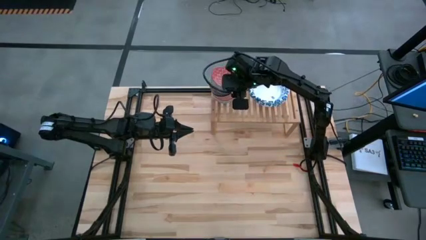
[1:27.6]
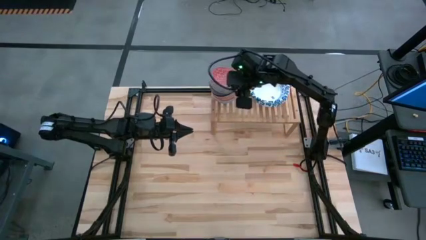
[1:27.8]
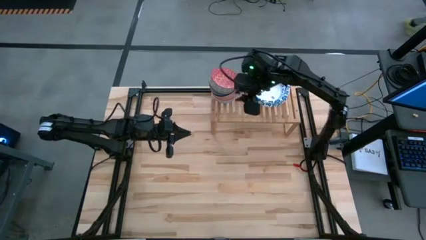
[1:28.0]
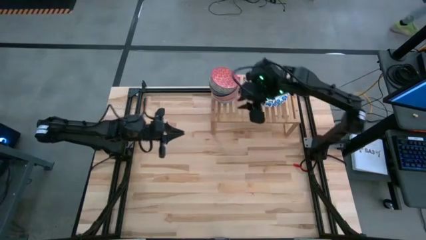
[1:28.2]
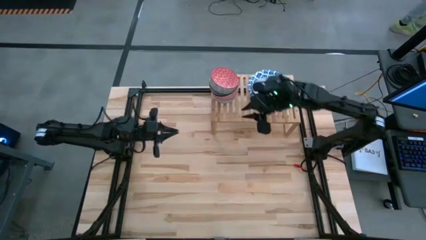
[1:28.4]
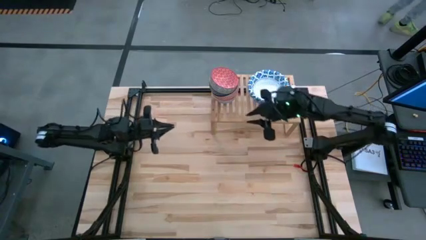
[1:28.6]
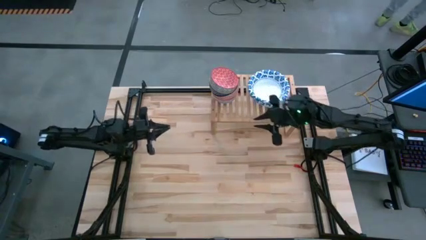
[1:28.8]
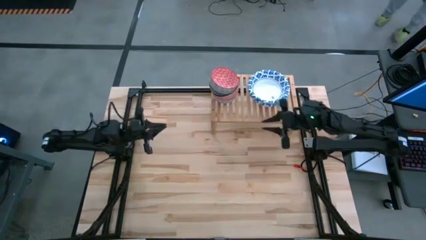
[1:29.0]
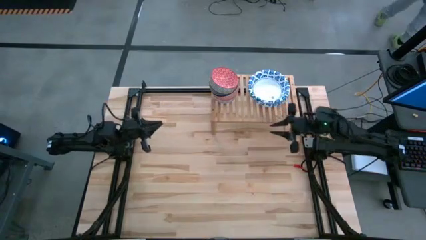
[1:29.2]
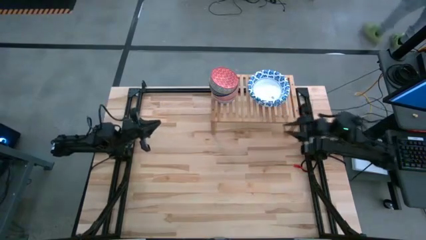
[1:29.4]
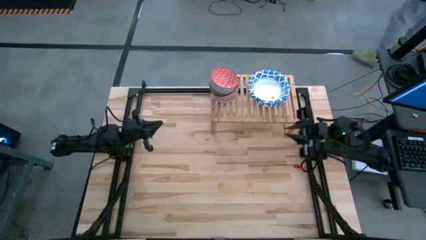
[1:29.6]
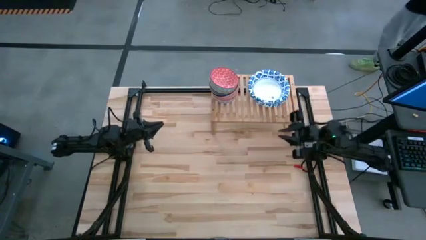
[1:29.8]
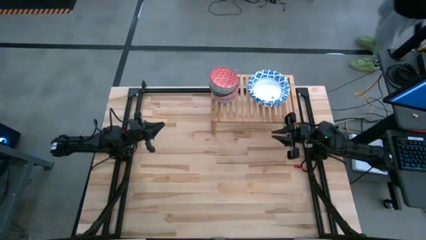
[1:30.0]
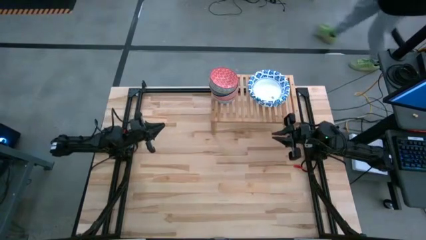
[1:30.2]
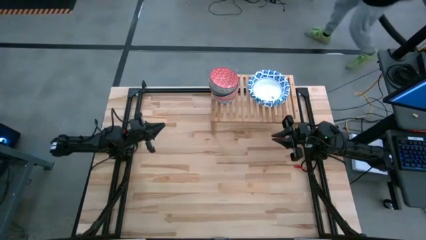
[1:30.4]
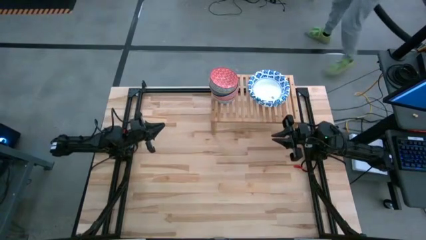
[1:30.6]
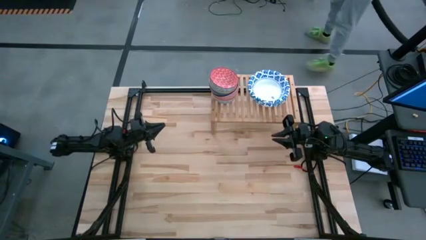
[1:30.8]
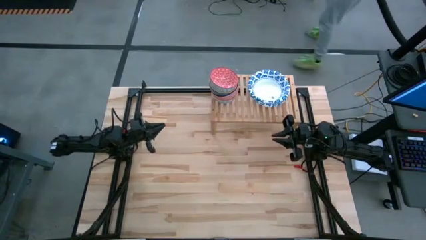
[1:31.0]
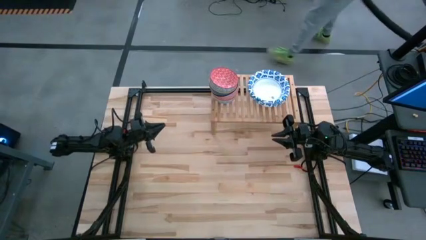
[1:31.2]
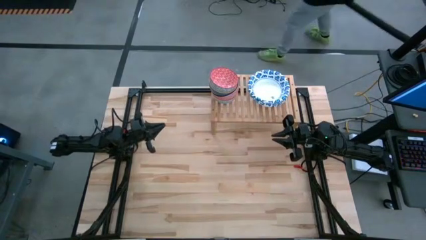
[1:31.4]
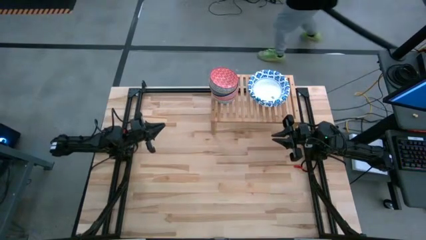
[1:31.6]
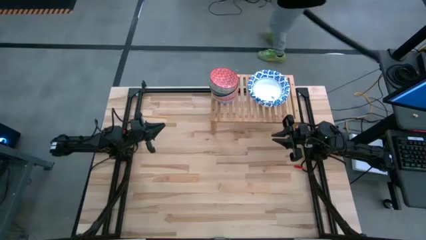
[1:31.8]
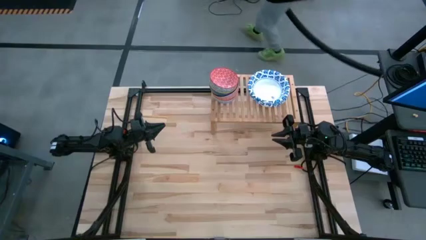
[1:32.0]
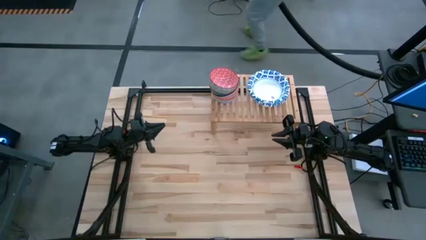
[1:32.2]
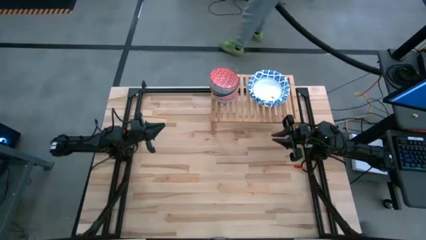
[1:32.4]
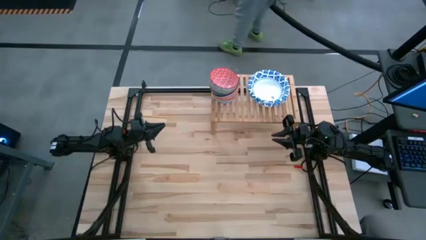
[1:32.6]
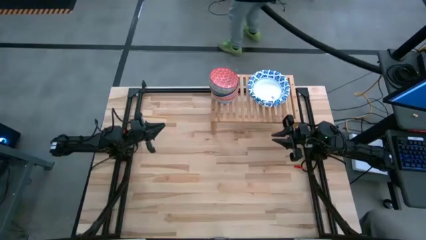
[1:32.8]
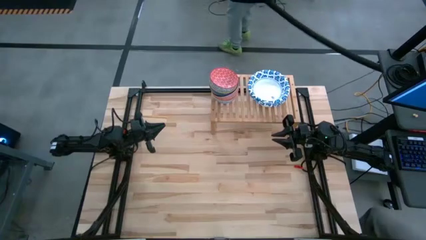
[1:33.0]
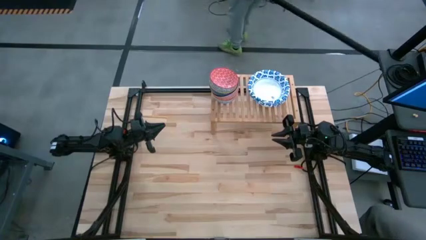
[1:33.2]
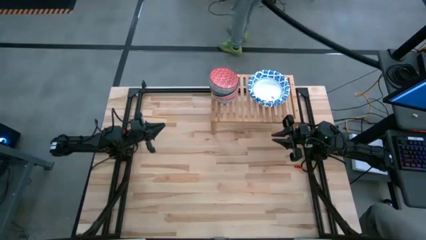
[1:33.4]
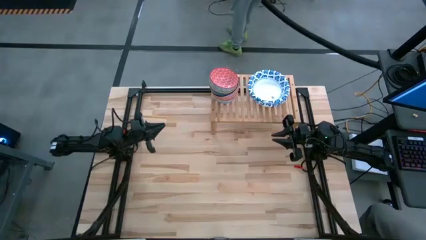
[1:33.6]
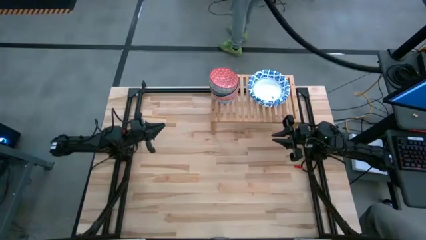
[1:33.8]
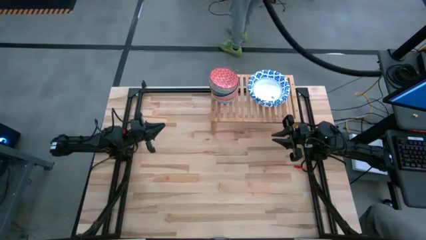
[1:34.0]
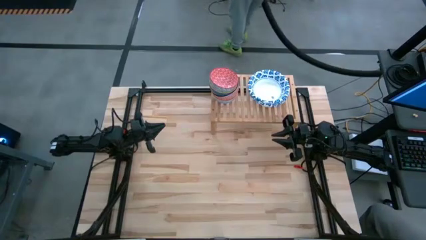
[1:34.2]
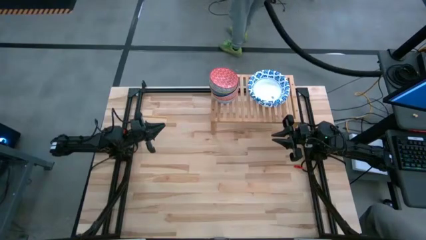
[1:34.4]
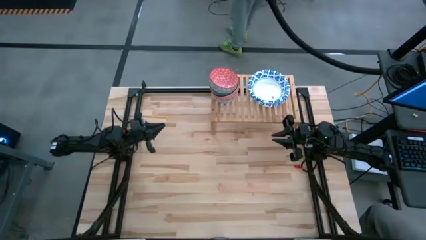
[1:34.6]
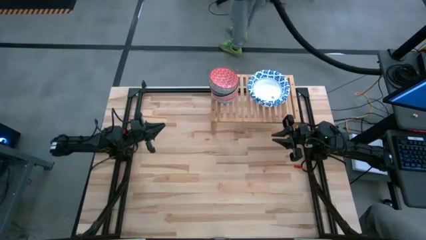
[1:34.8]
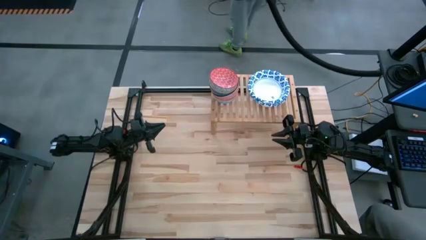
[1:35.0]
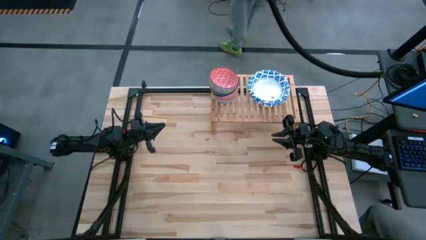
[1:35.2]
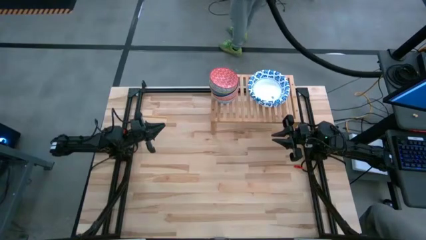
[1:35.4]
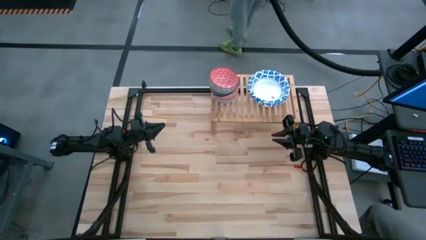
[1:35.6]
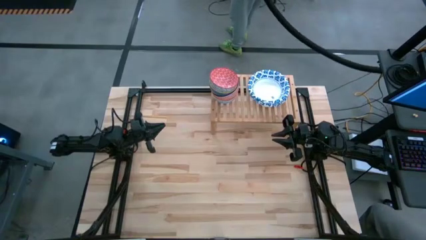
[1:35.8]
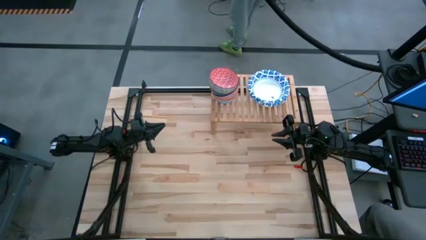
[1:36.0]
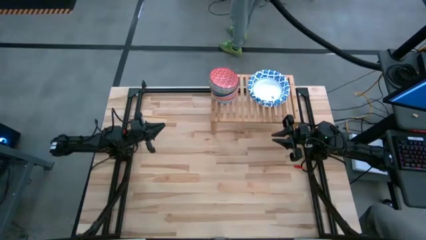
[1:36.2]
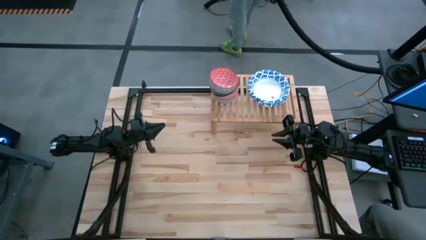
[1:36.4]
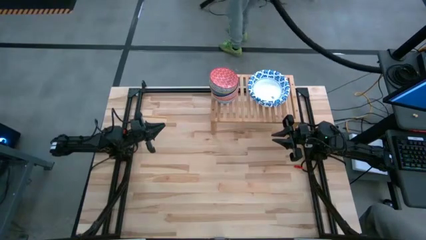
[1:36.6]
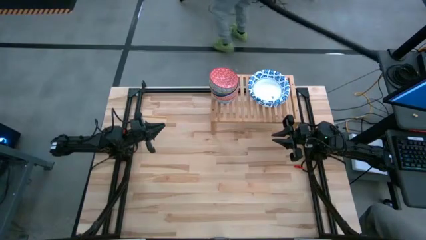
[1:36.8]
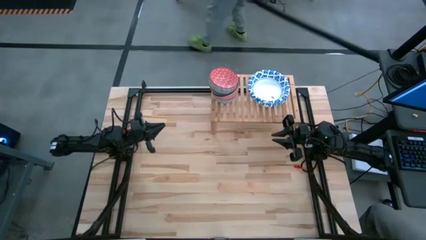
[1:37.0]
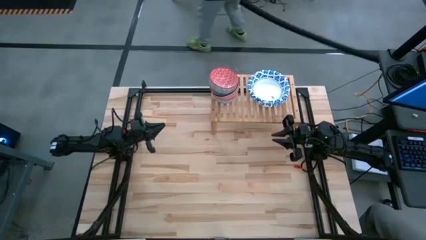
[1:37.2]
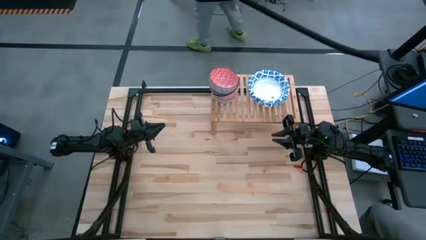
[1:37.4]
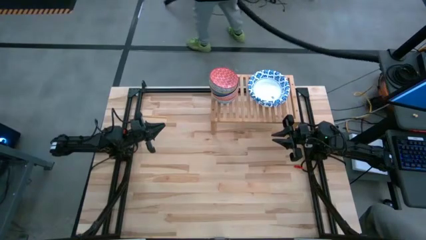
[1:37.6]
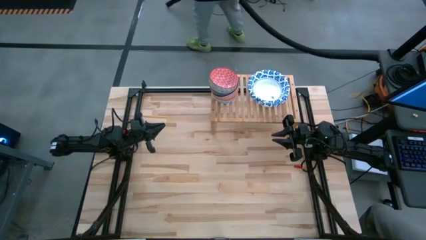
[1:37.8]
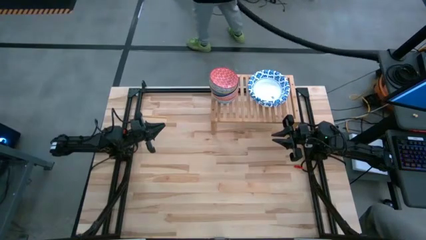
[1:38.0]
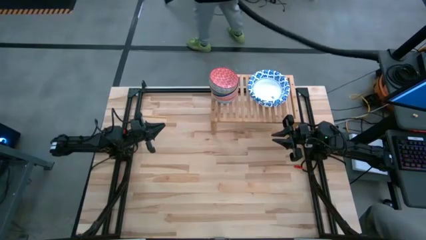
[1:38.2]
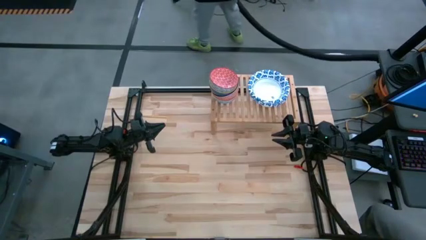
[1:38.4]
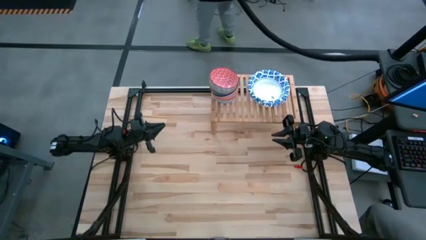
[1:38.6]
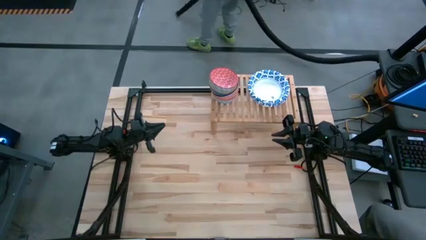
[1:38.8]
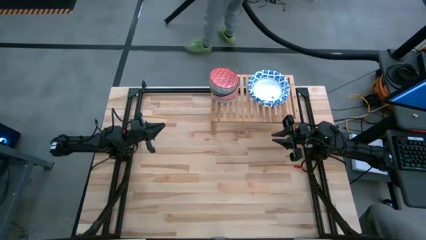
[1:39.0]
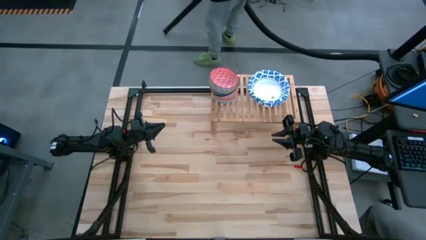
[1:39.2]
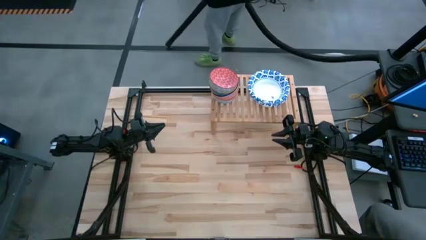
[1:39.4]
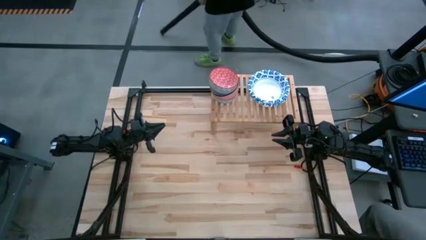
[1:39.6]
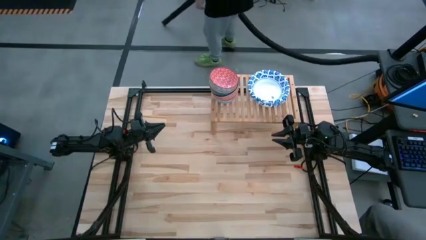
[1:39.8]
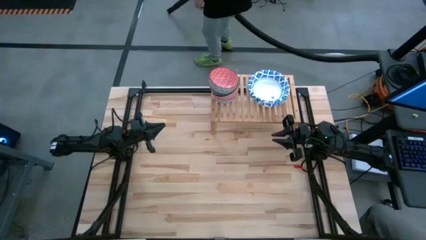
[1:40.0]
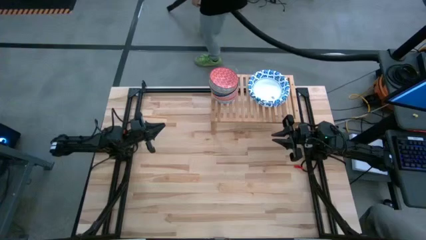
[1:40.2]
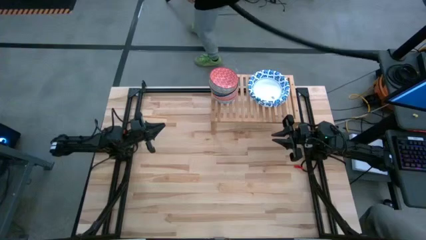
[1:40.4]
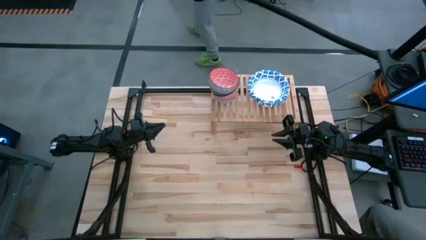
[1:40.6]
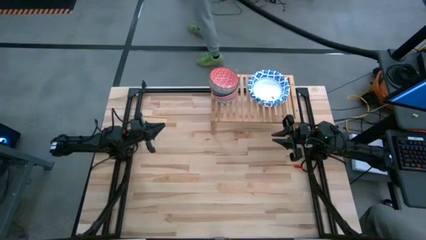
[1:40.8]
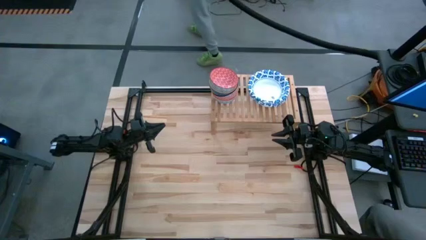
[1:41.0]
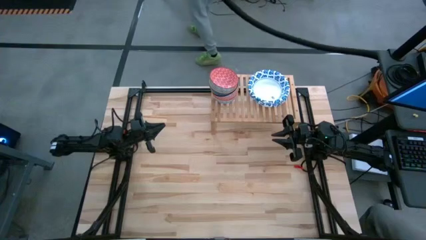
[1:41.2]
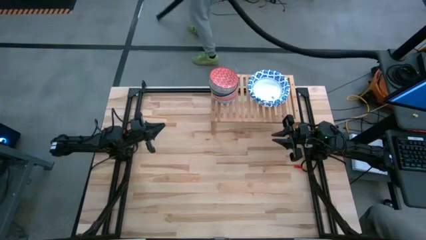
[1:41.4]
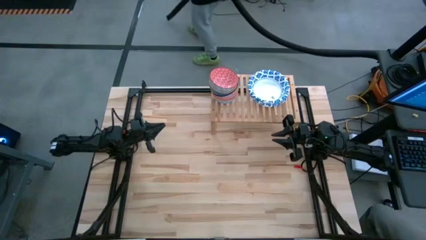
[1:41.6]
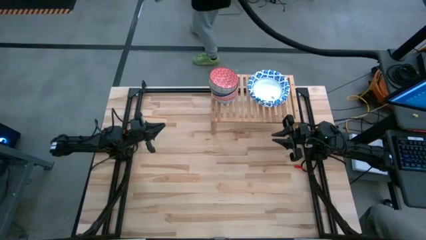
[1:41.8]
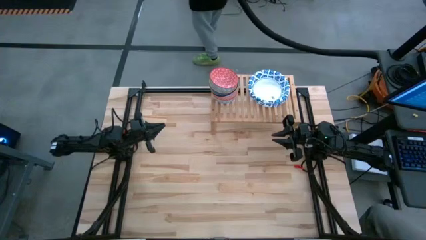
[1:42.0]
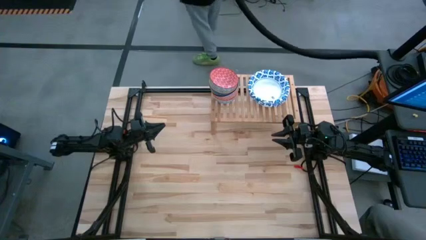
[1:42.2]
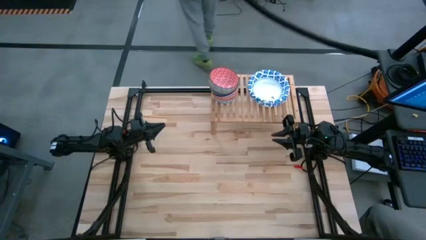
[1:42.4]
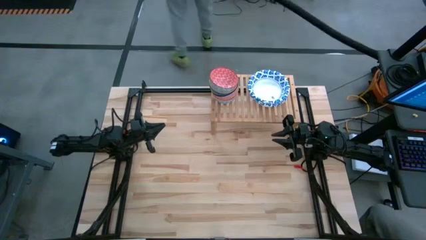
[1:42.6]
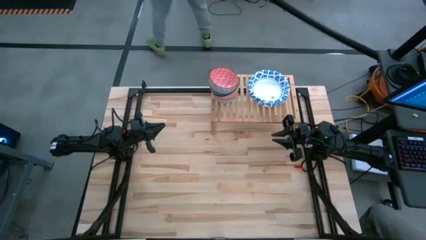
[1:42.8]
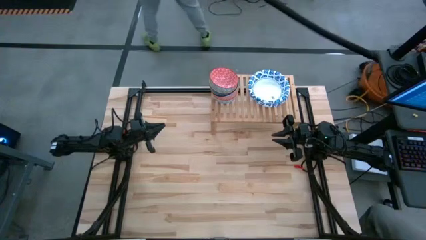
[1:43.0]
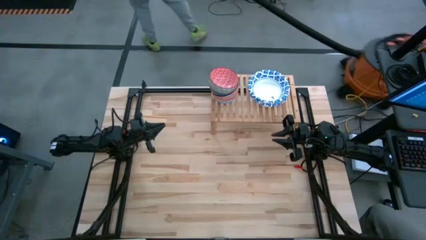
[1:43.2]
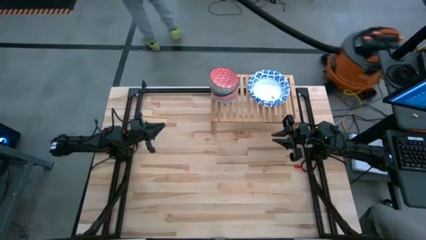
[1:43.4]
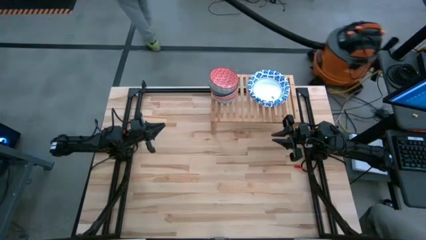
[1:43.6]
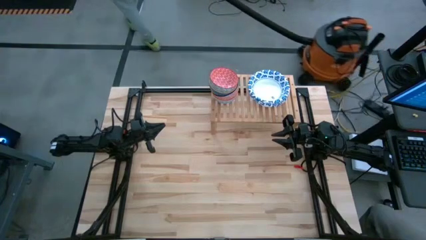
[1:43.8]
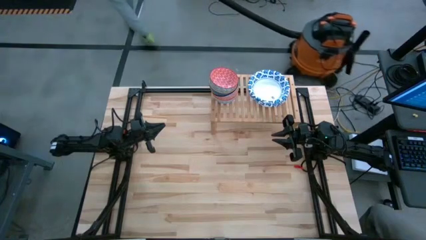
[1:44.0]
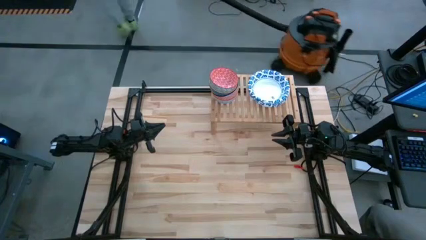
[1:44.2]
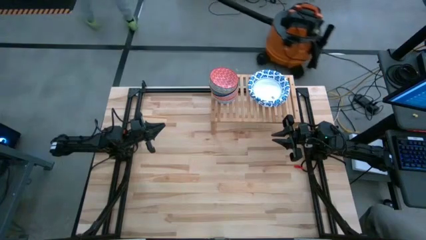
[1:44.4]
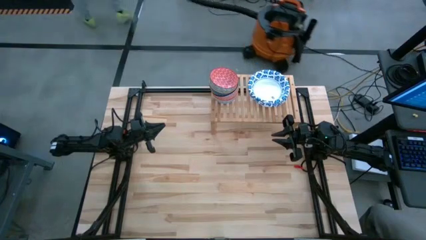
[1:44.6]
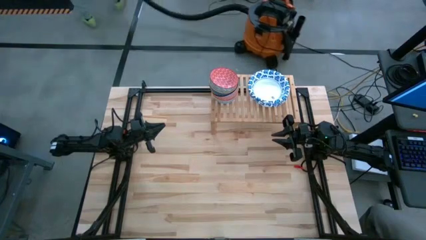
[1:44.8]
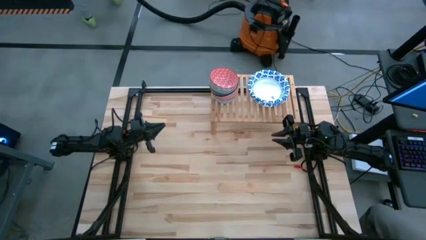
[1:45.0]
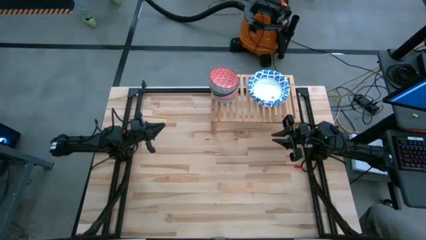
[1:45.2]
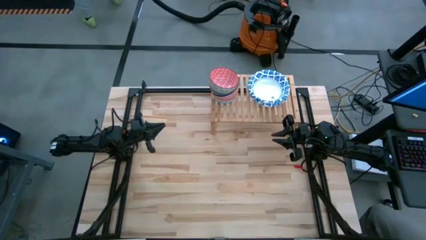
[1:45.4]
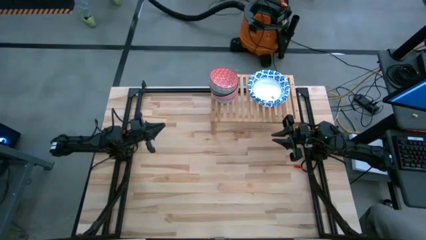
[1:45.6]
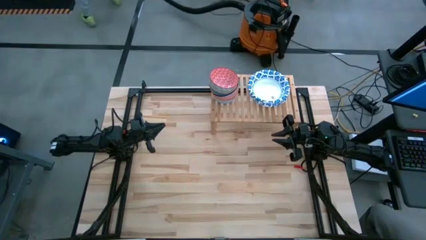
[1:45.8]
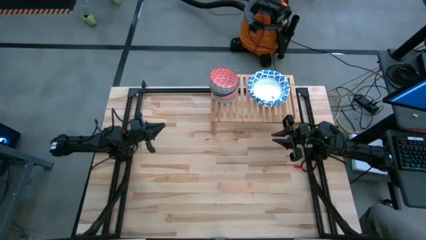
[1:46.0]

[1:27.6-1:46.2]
Task: Place and stack bowls onto a shelf
Return to Home Position
